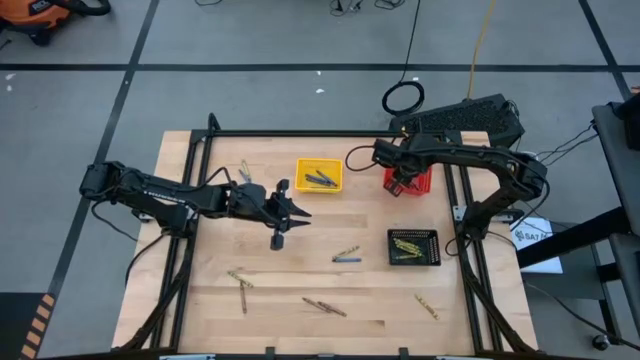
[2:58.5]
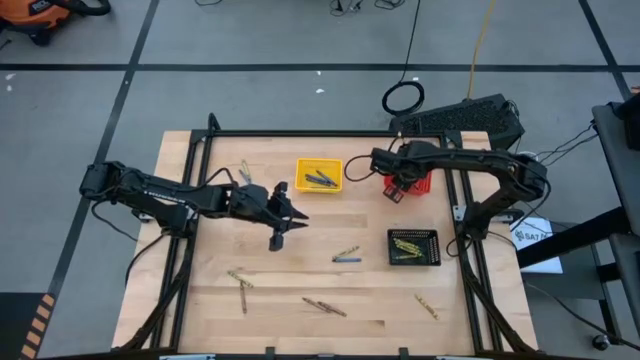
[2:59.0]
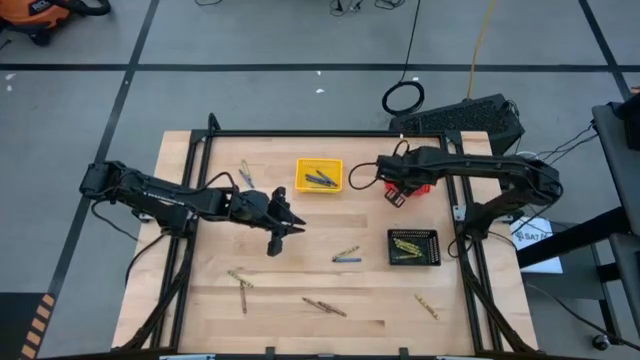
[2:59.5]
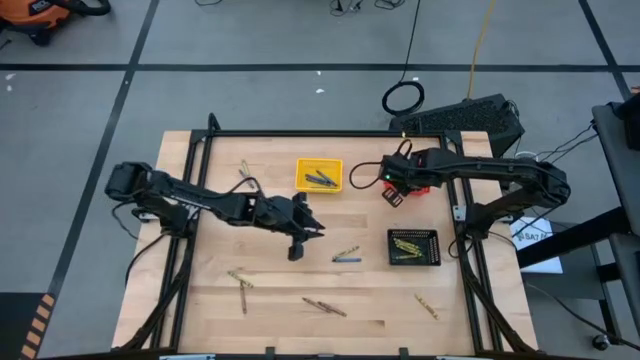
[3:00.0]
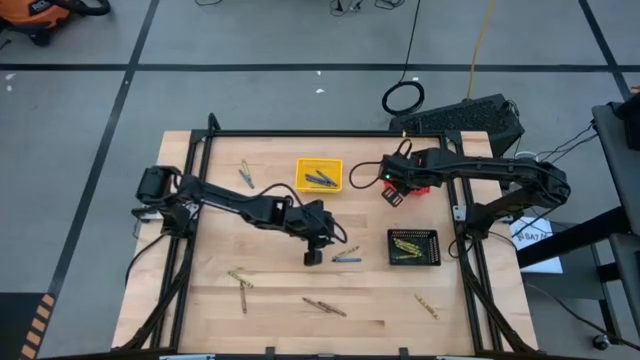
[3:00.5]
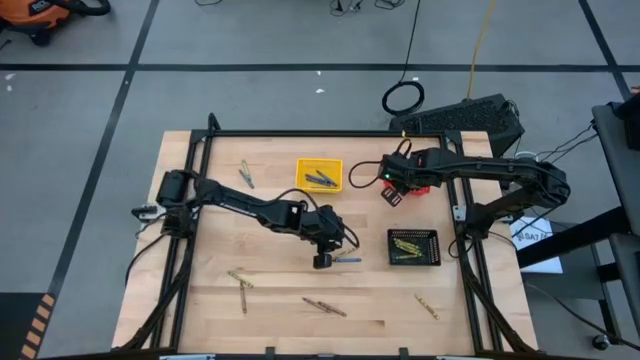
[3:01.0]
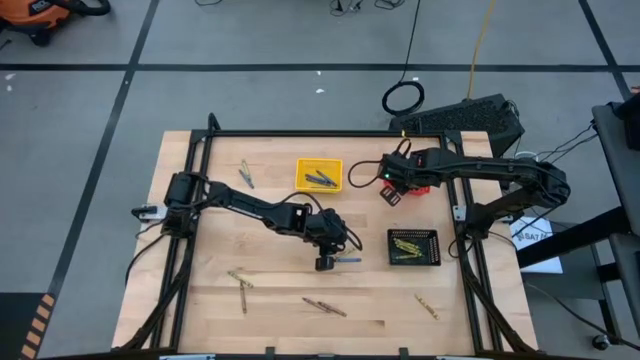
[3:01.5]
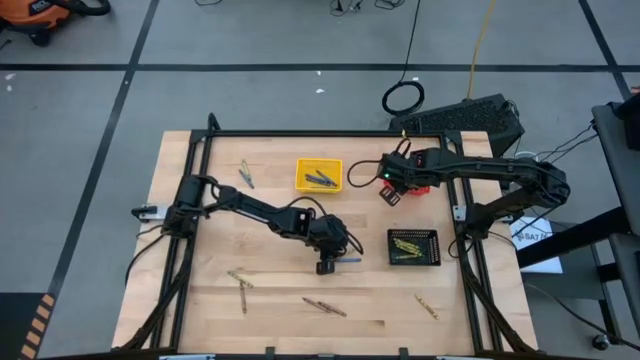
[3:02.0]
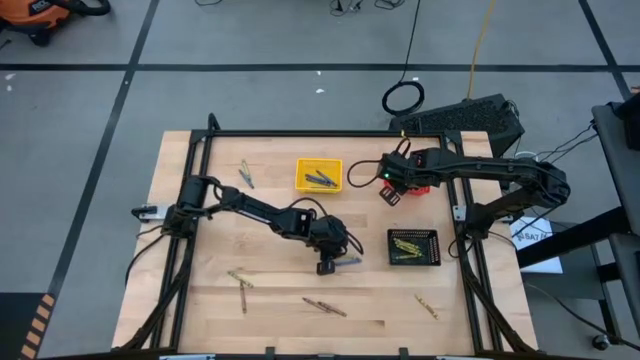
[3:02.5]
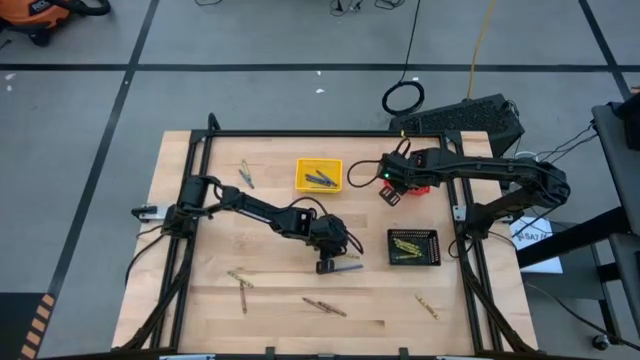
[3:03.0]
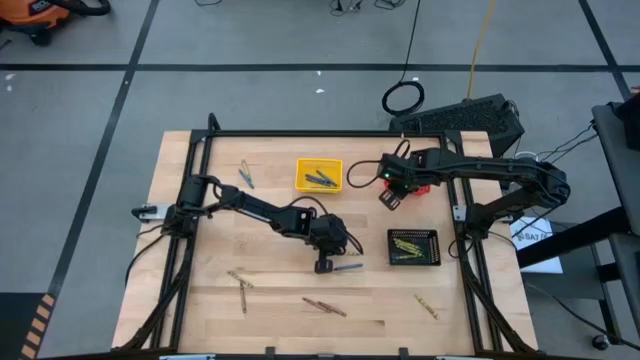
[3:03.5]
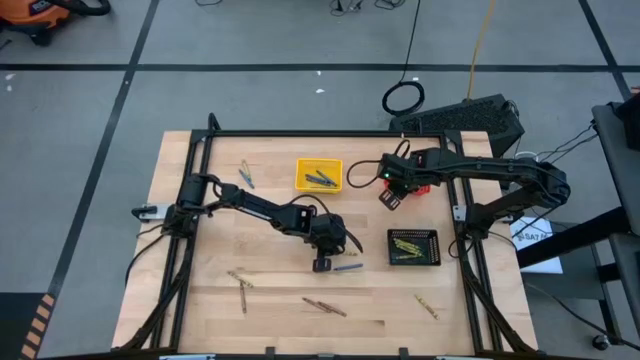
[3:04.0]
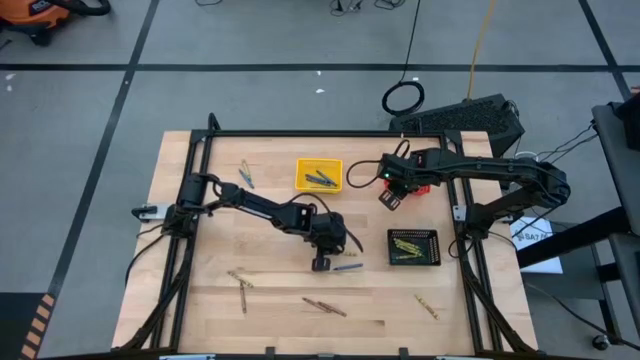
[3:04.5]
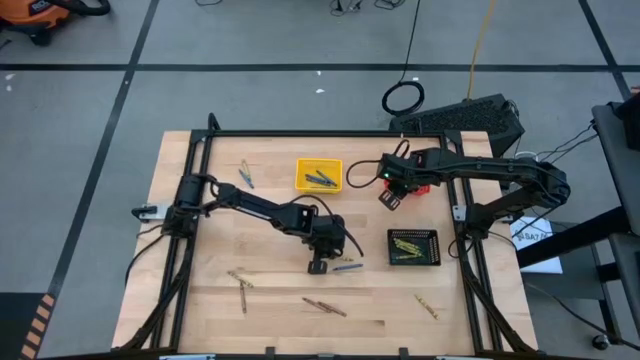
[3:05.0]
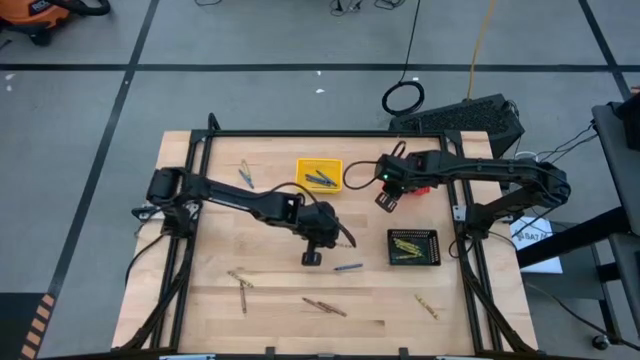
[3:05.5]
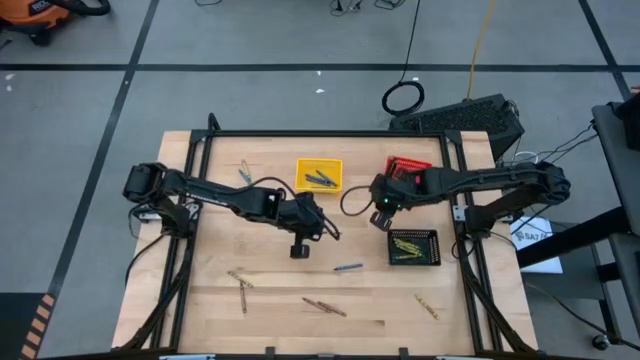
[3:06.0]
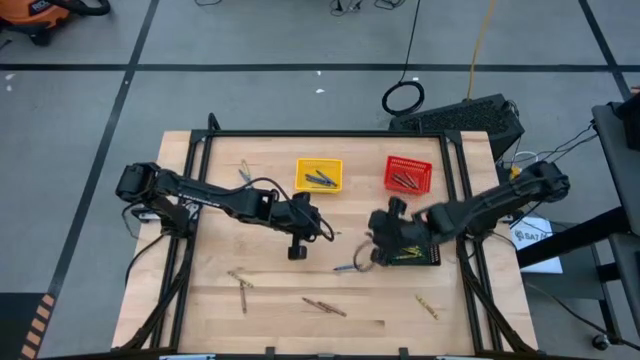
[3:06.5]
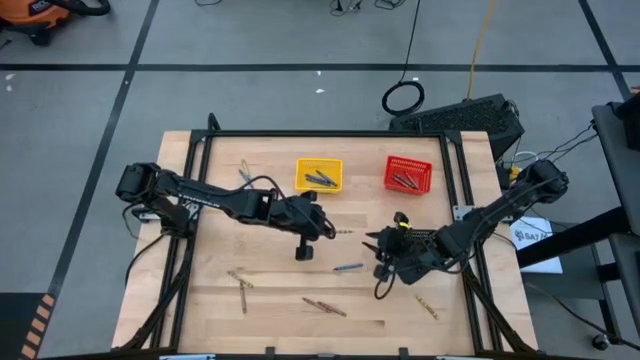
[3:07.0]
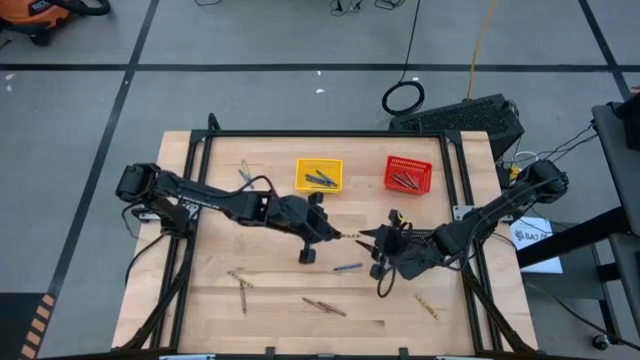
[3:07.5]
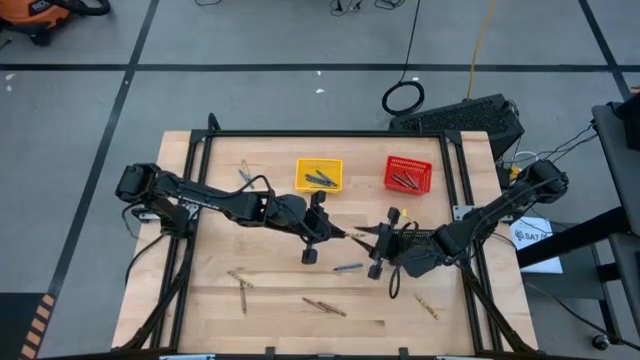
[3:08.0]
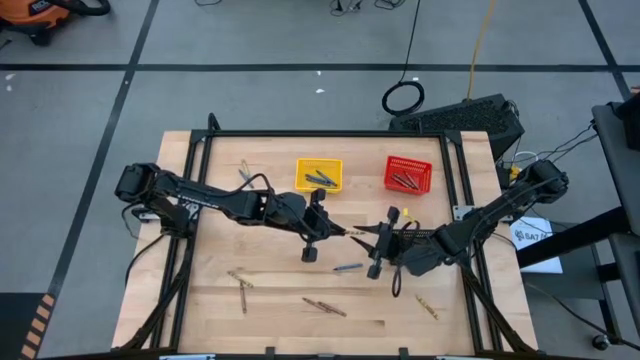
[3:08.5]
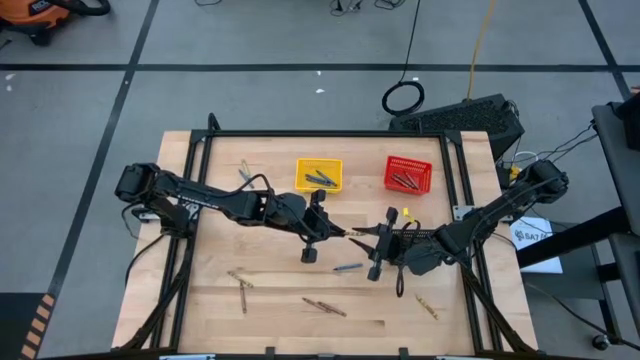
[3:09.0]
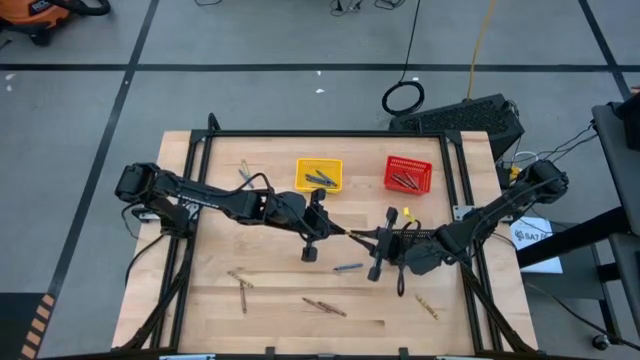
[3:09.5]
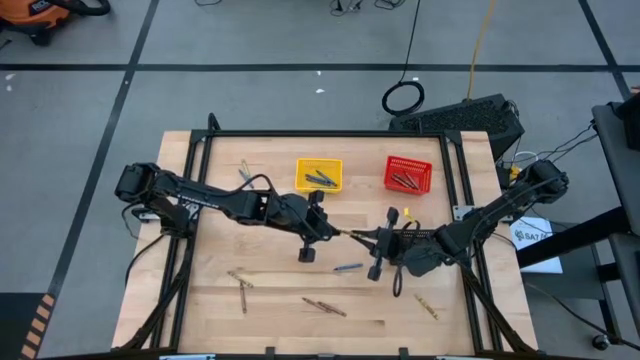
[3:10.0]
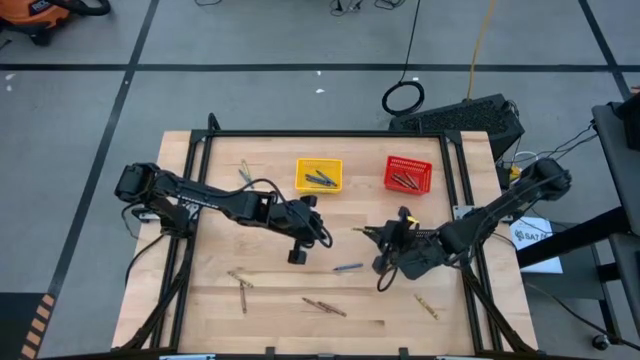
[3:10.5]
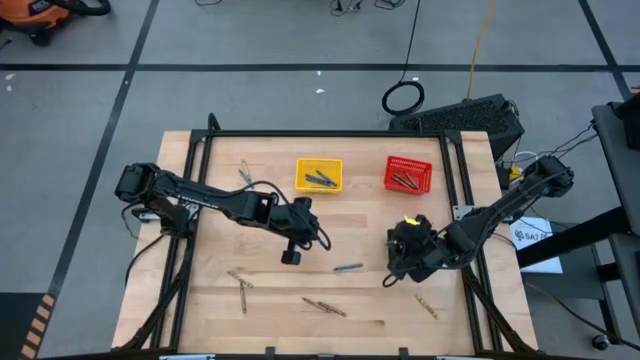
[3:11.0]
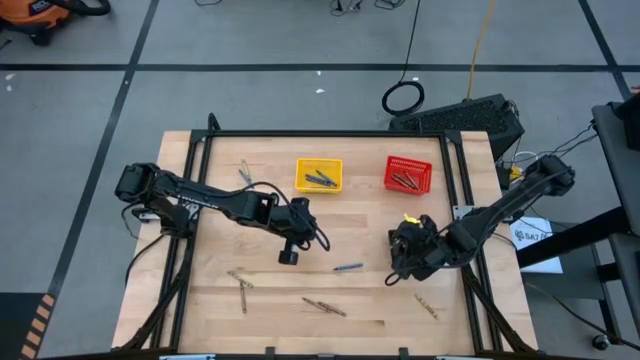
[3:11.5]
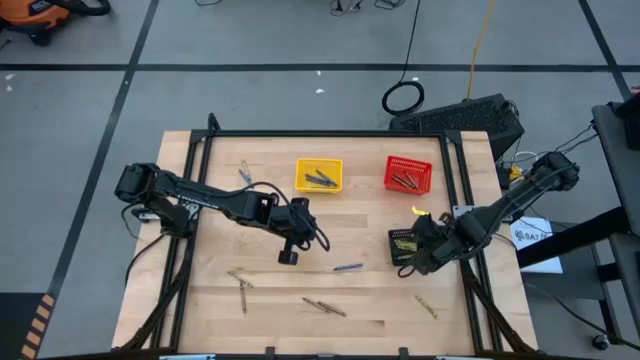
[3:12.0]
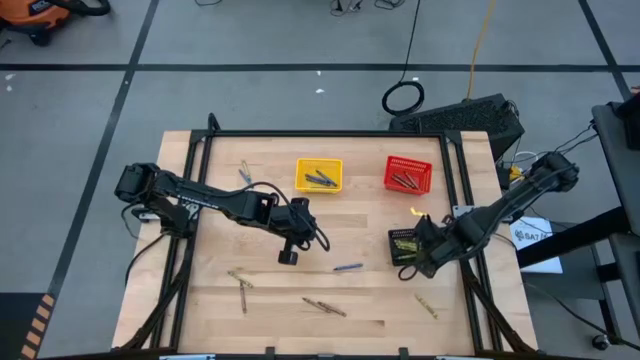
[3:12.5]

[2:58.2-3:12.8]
Task: Sort crayons
Put the green crayon into the black bin

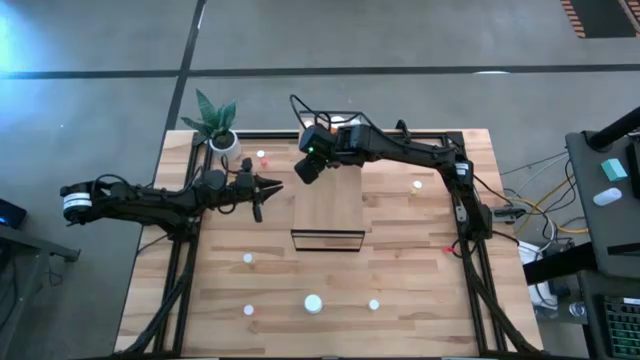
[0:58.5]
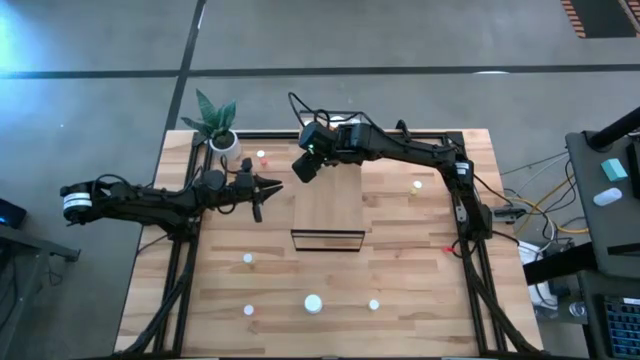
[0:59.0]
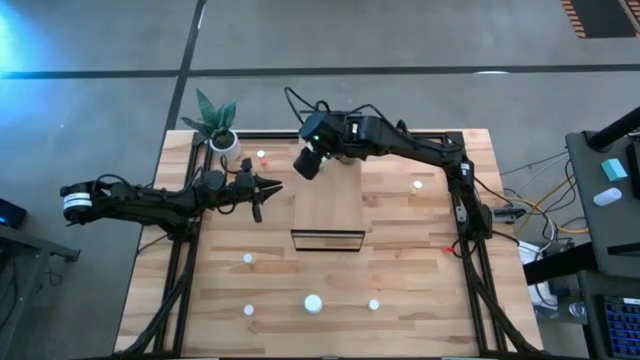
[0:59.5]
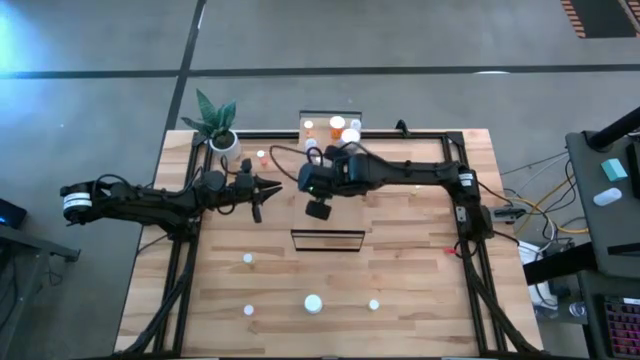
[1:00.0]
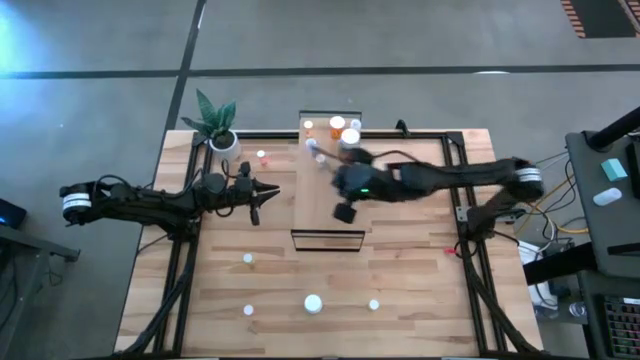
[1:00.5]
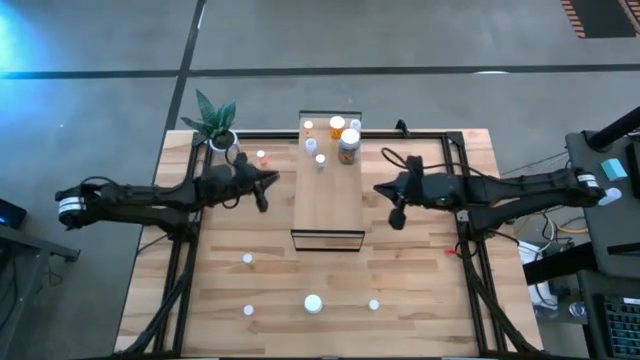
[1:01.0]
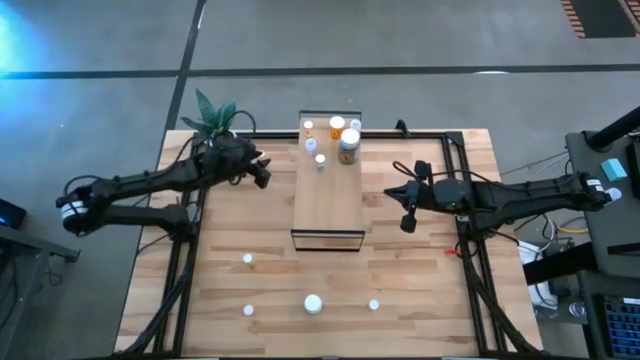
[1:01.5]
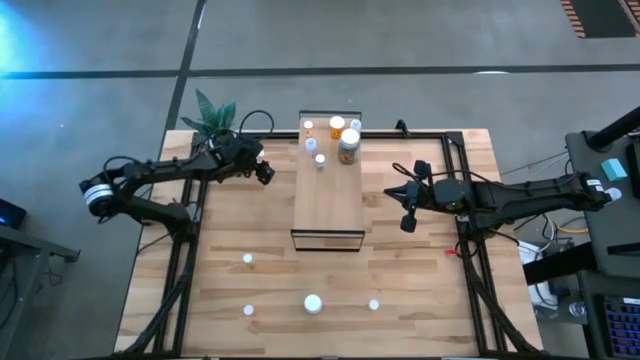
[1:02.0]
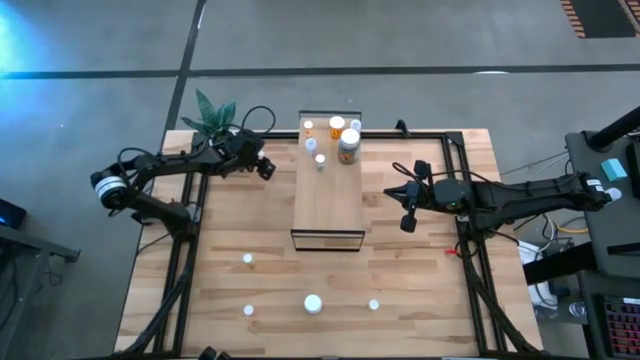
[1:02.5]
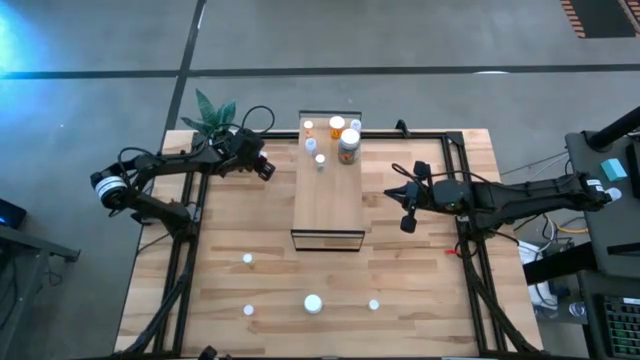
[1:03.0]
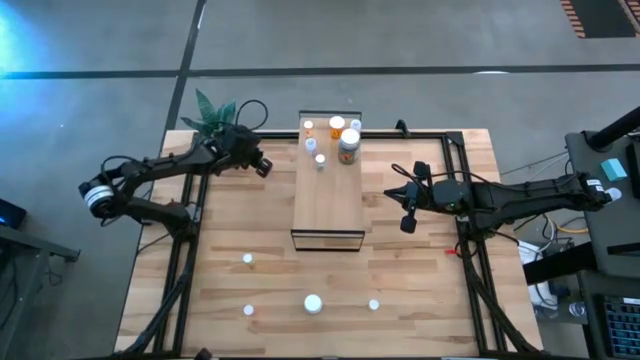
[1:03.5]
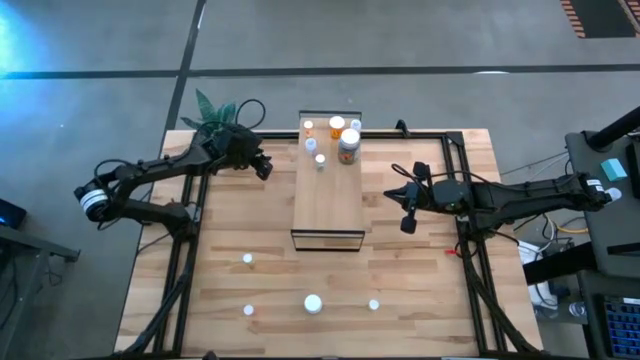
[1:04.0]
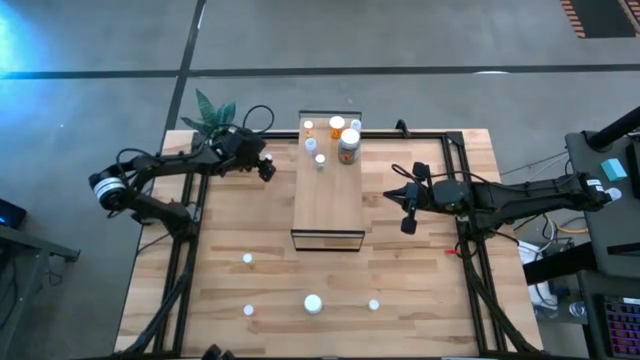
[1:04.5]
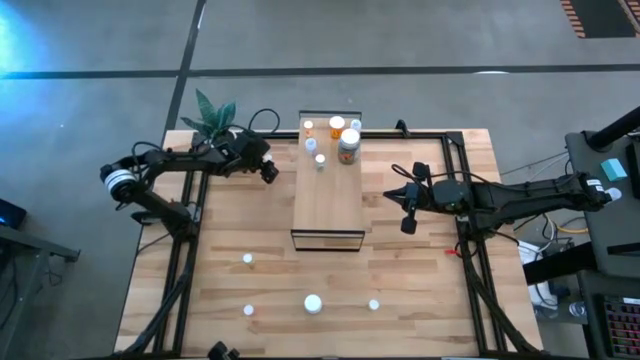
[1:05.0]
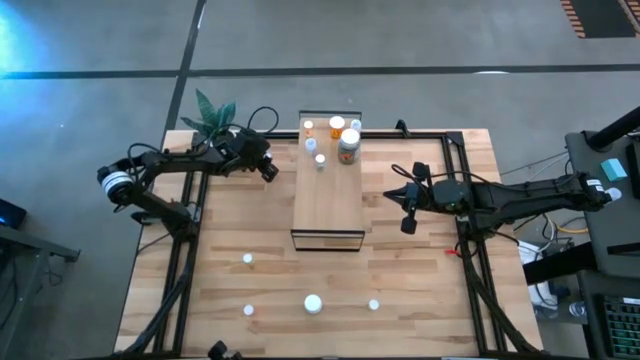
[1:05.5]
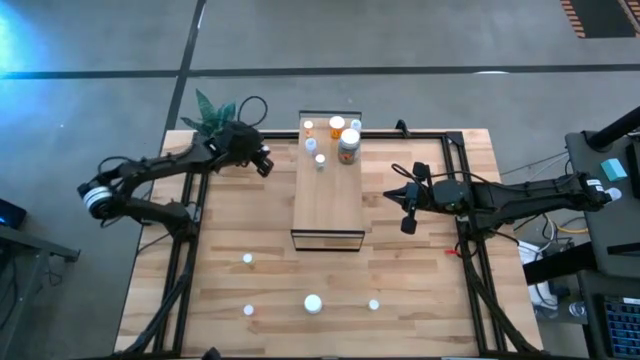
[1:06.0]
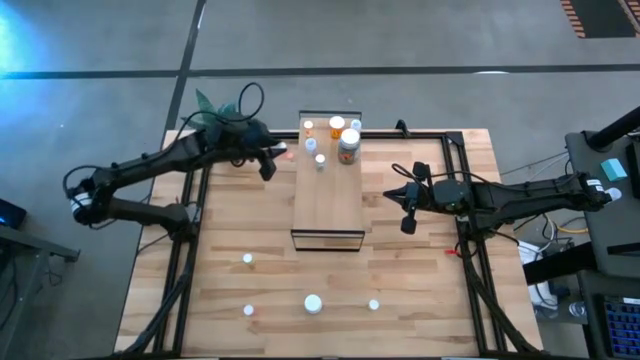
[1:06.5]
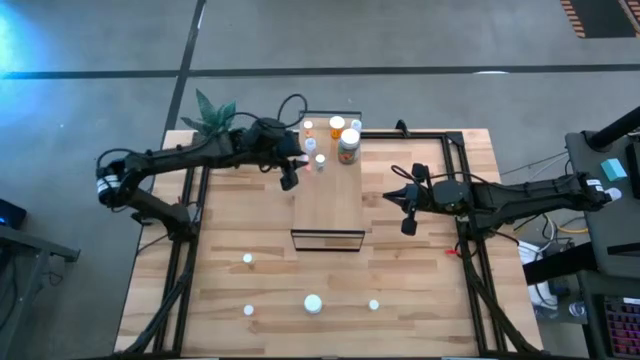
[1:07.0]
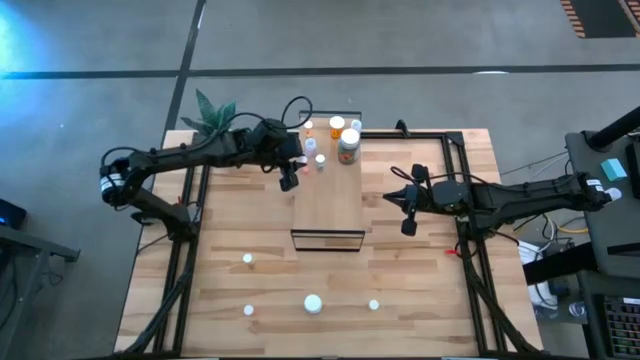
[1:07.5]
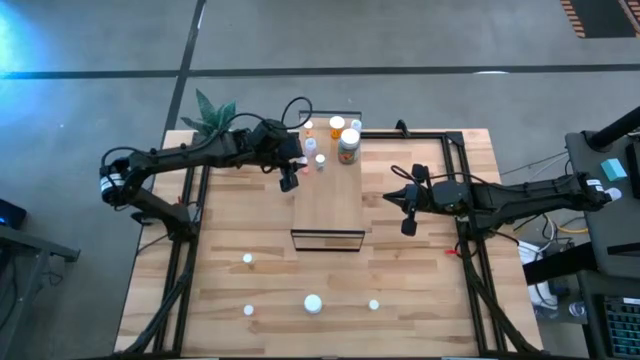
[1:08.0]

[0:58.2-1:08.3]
Task: Pick and place medicine bottles onto shelf by color
Put the top red pill bottle on the shelf
